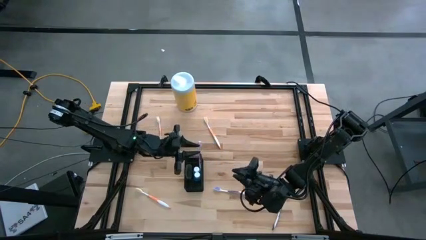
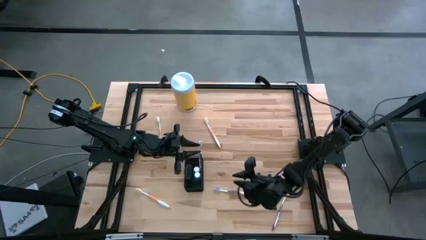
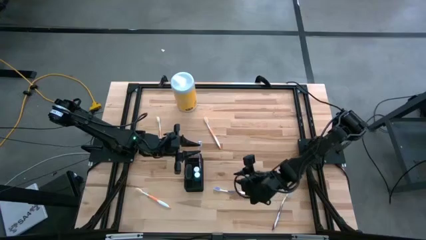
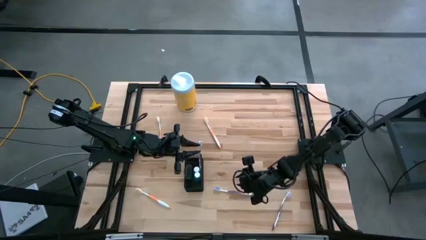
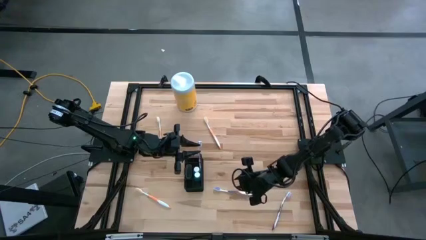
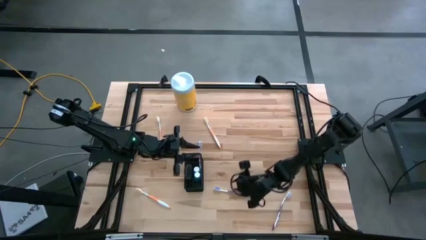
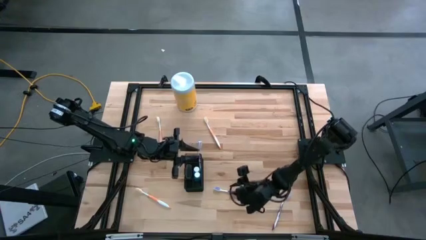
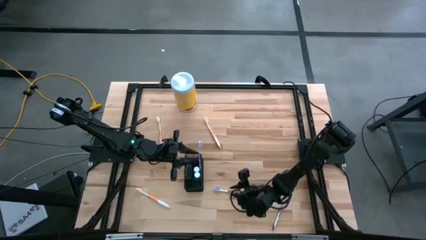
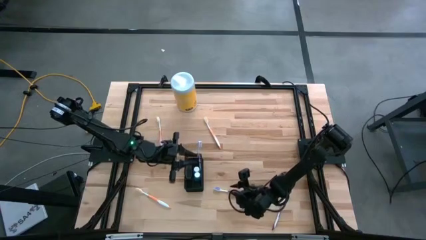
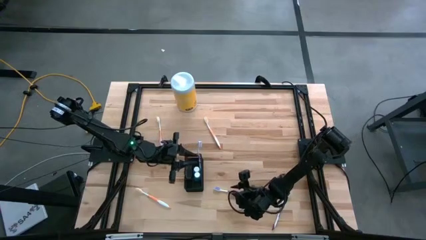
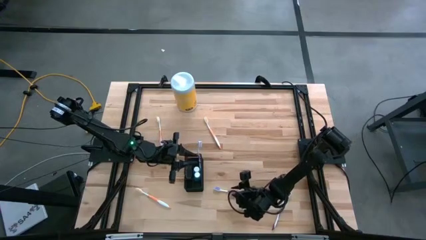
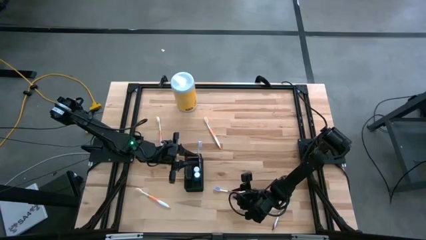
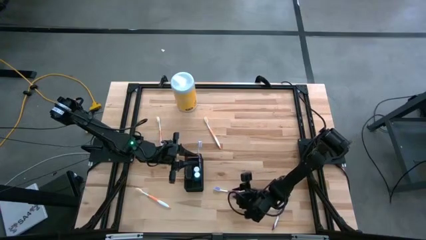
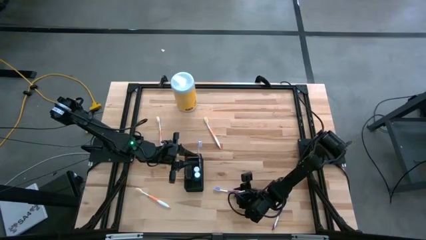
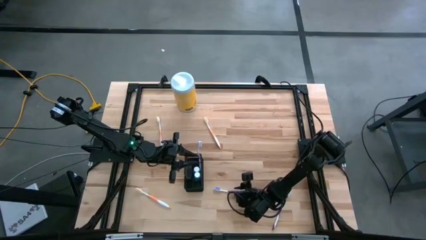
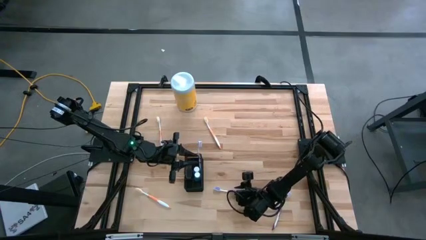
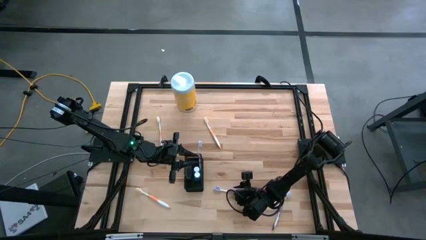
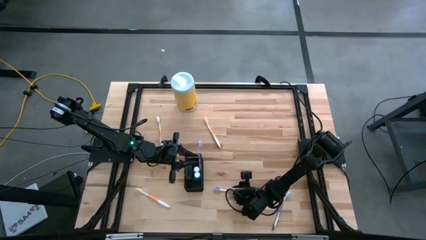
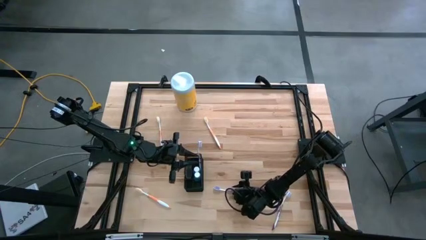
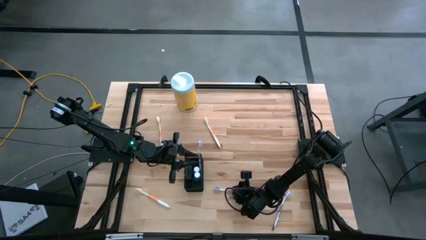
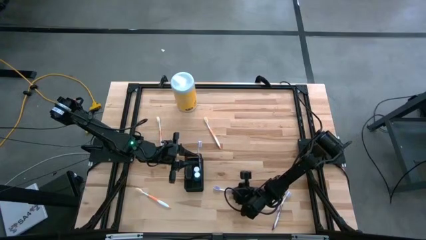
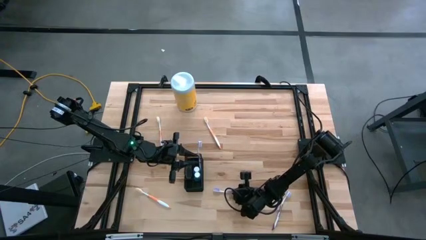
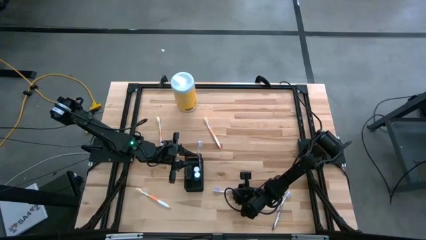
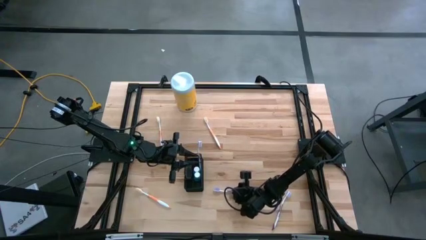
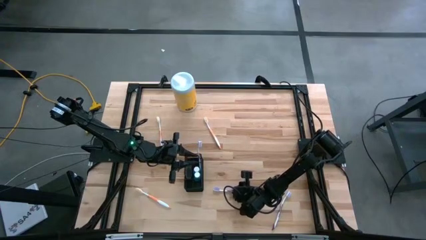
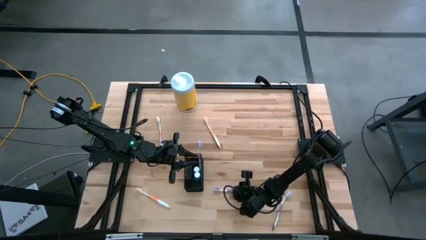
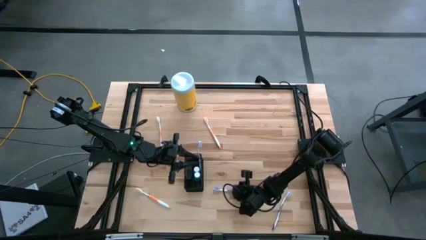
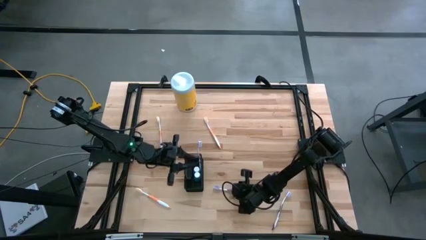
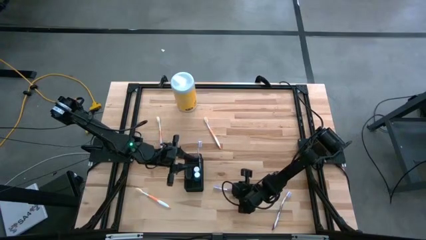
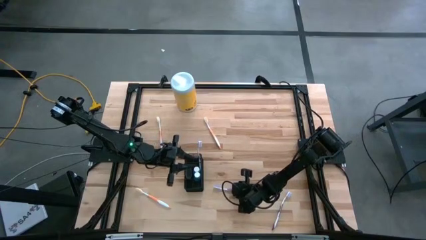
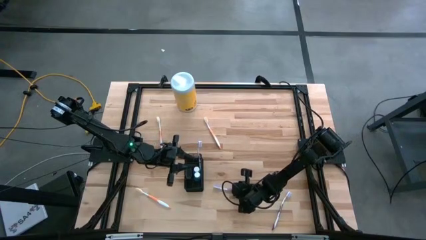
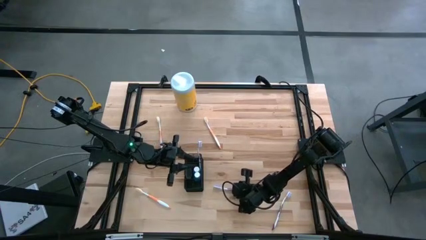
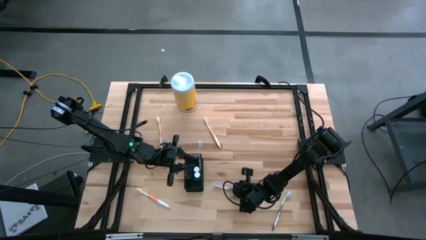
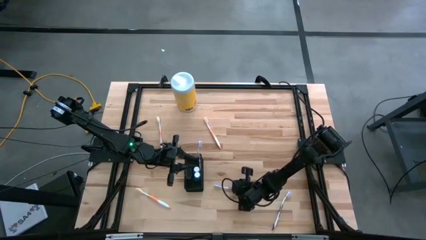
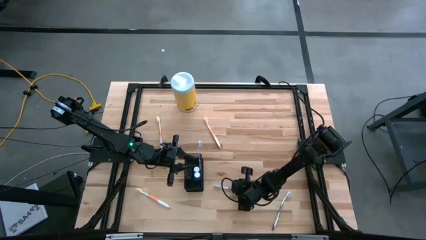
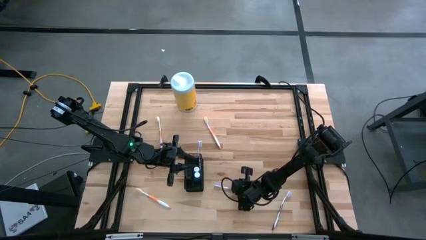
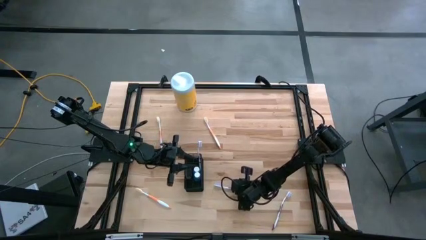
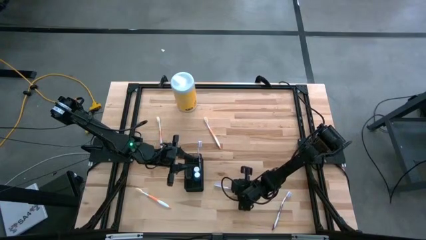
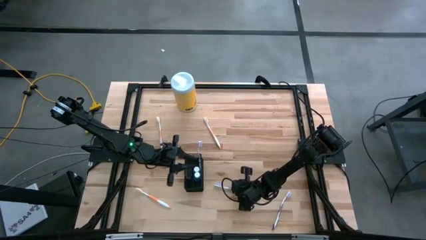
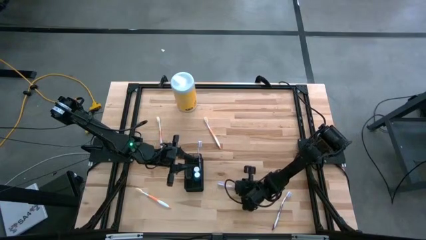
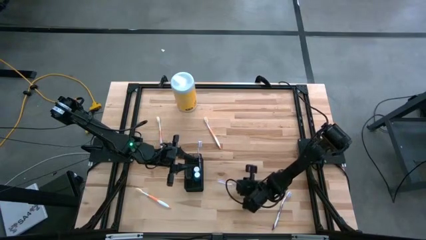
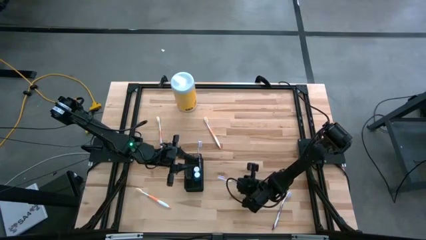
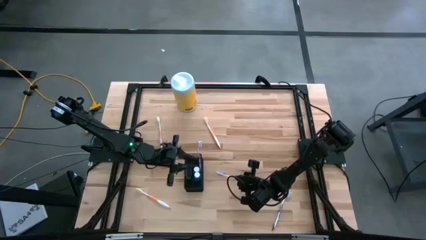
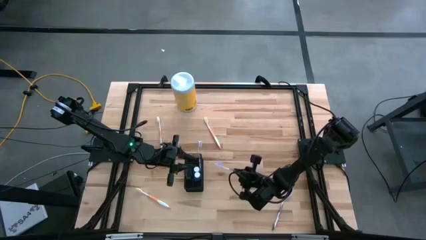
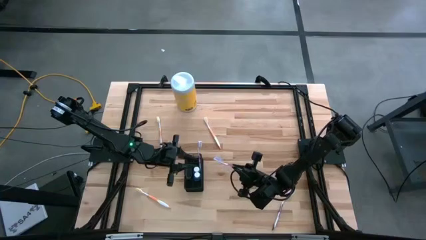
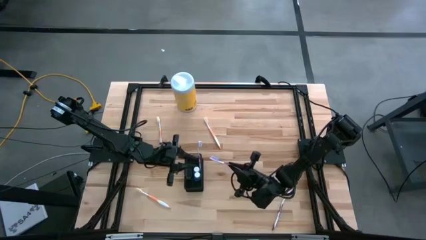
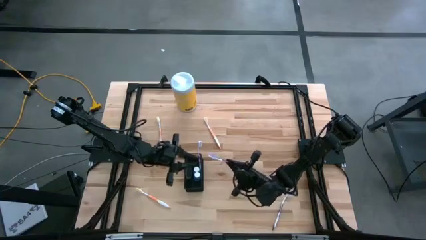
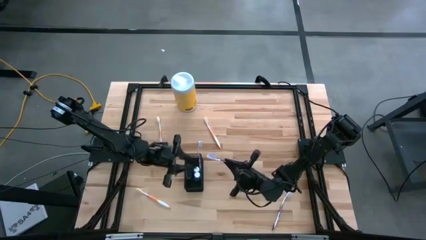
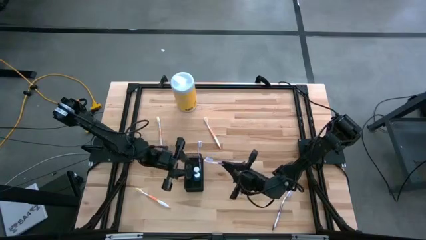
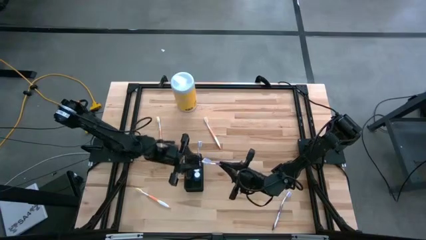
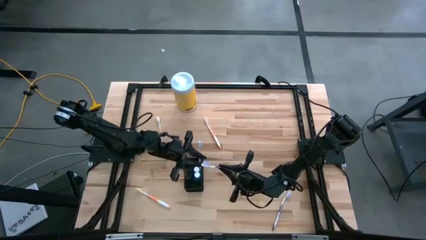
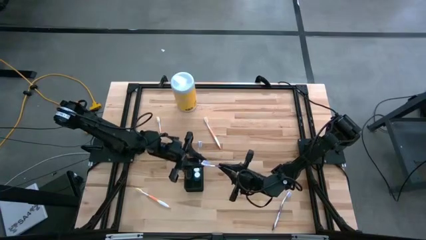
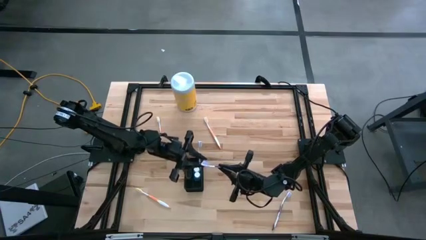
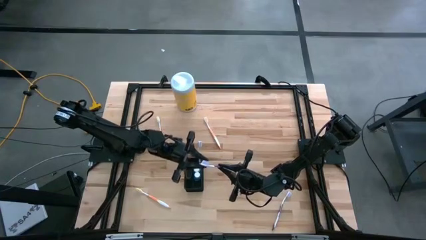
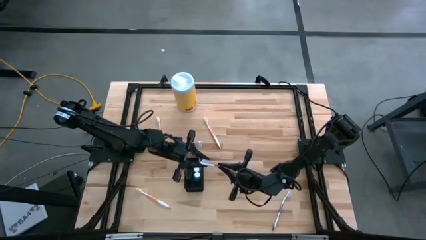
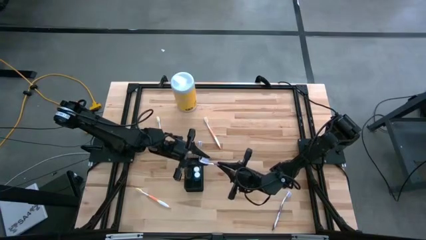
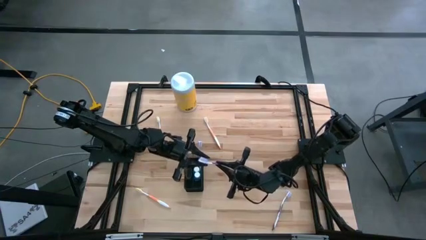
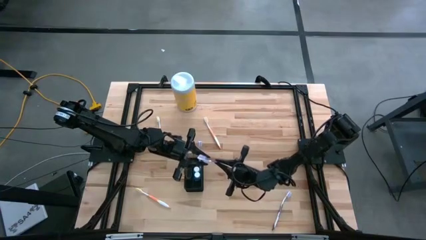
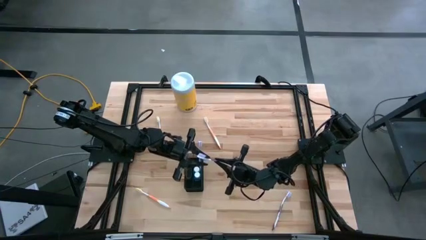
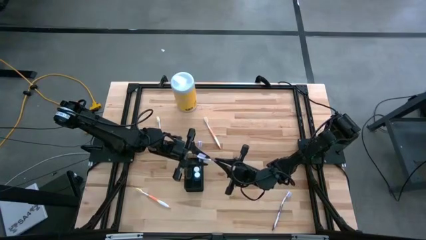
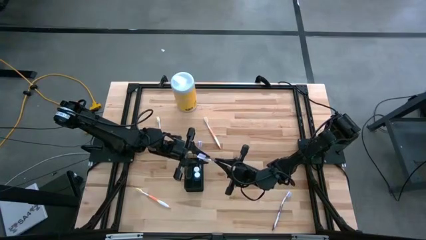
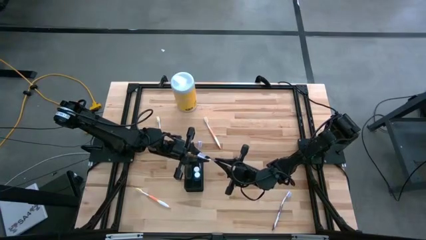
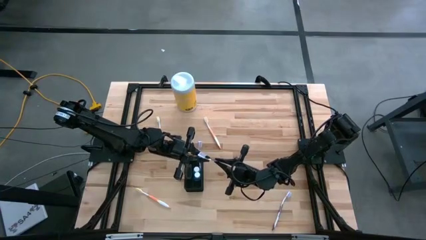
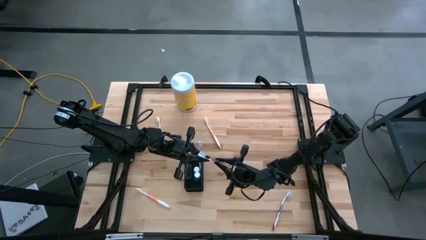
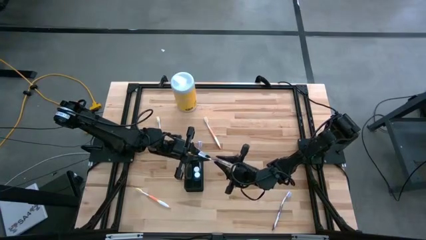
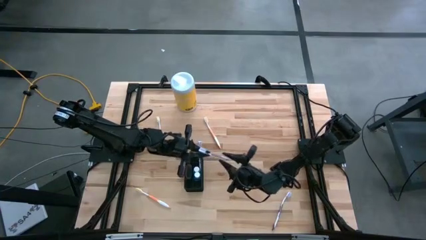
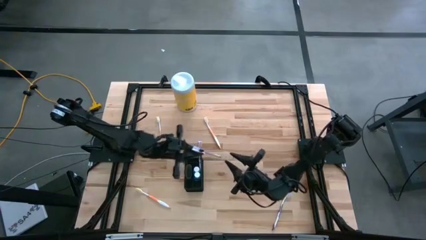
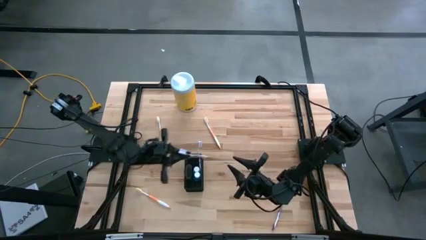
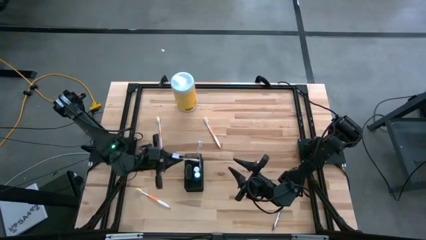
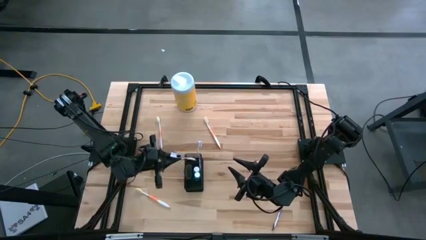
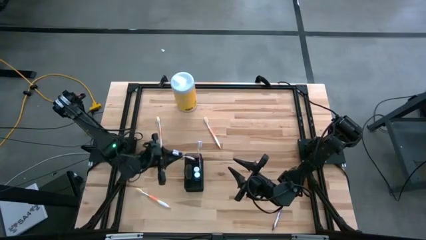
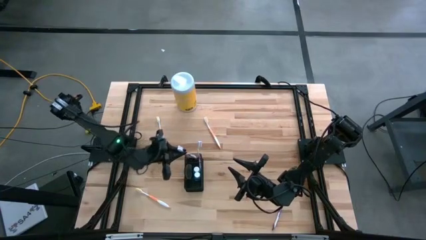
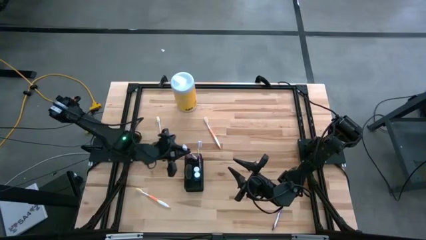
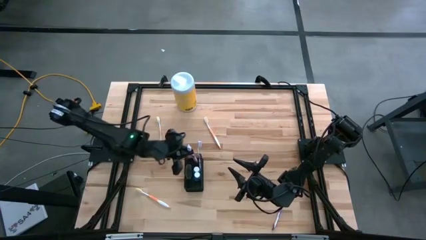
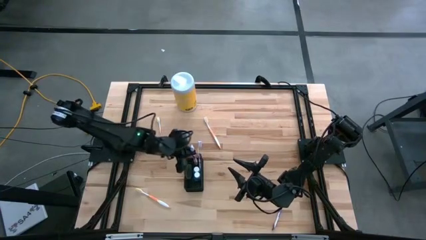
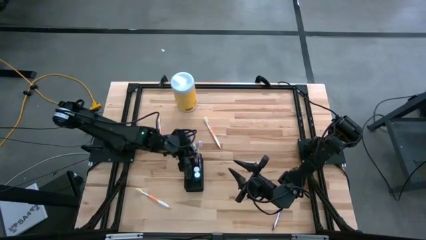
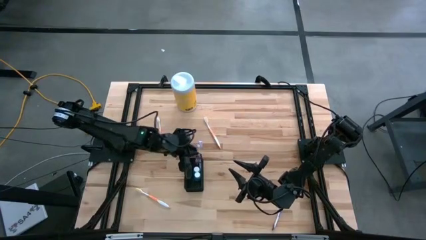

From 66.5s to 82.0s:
Task: Pick & Place toothbrushing station
Put the left purple toothbrush into the top section of the black wire organizer
